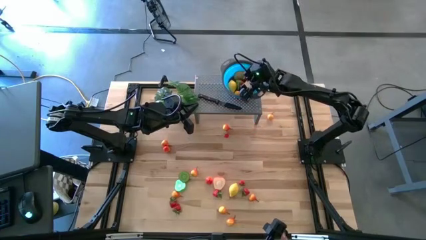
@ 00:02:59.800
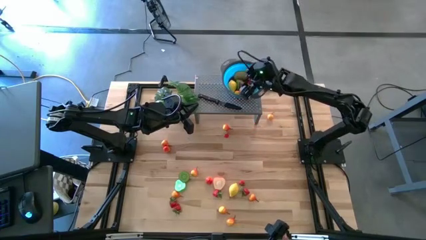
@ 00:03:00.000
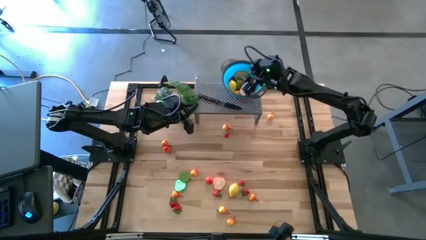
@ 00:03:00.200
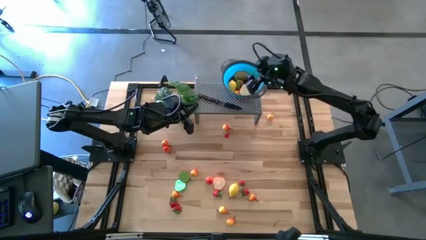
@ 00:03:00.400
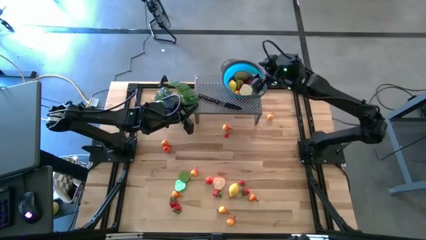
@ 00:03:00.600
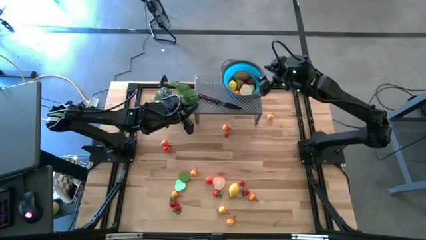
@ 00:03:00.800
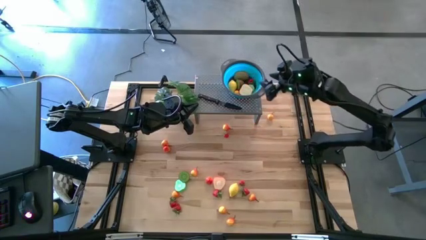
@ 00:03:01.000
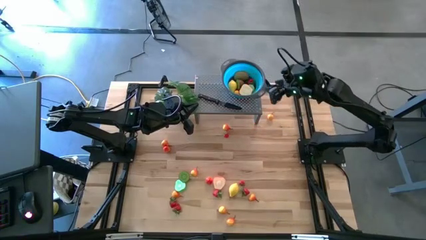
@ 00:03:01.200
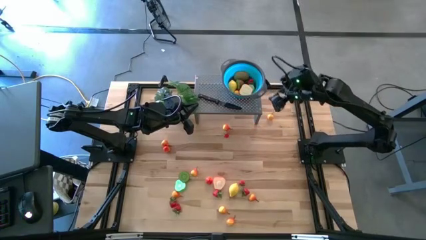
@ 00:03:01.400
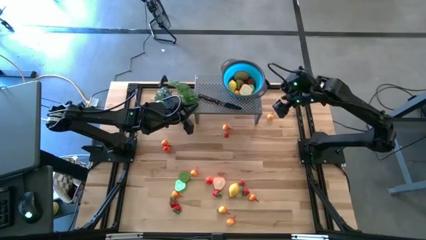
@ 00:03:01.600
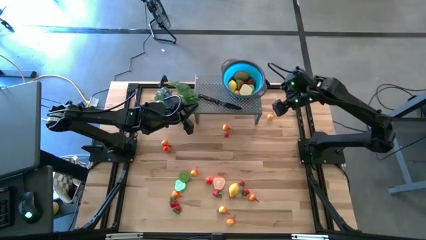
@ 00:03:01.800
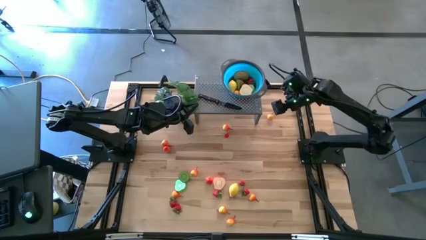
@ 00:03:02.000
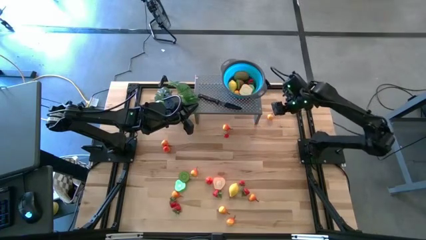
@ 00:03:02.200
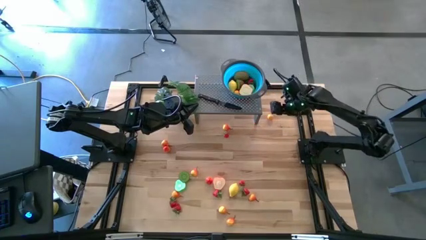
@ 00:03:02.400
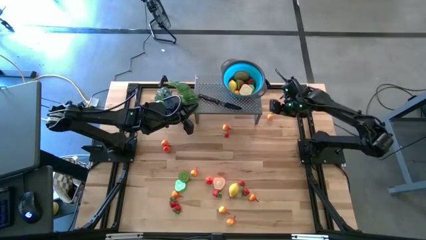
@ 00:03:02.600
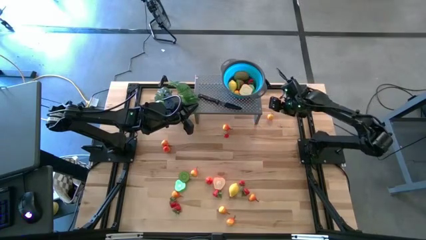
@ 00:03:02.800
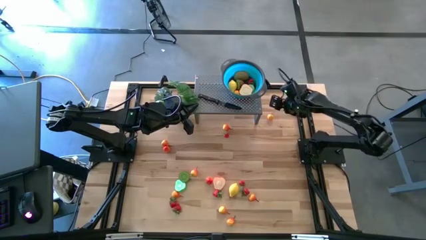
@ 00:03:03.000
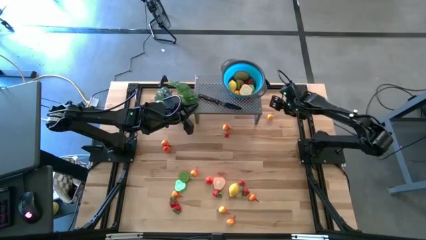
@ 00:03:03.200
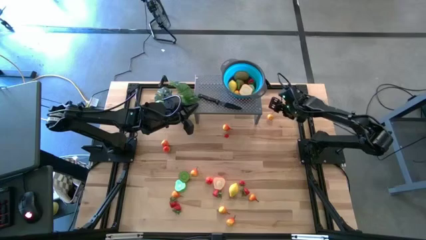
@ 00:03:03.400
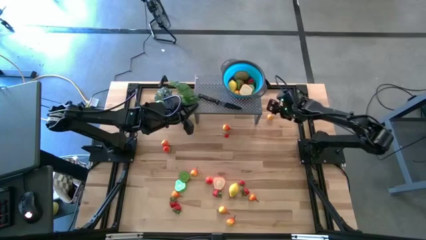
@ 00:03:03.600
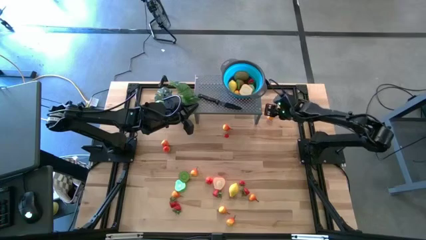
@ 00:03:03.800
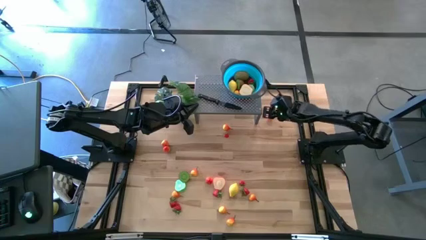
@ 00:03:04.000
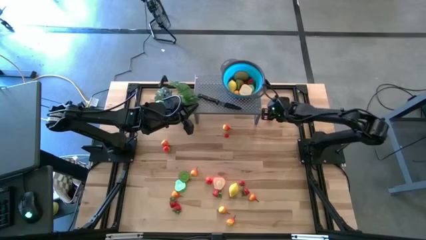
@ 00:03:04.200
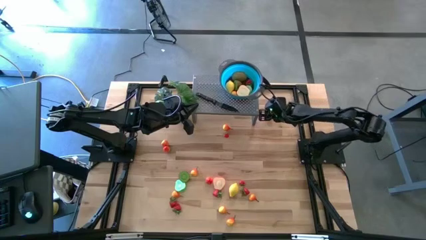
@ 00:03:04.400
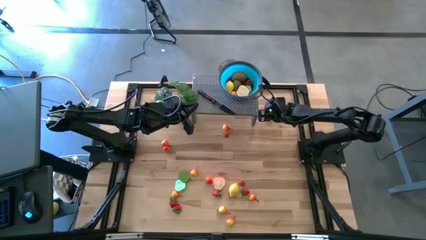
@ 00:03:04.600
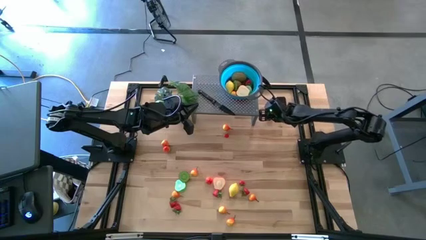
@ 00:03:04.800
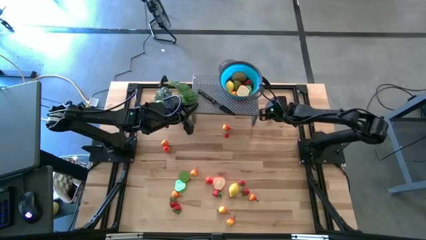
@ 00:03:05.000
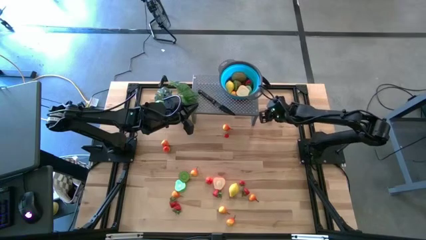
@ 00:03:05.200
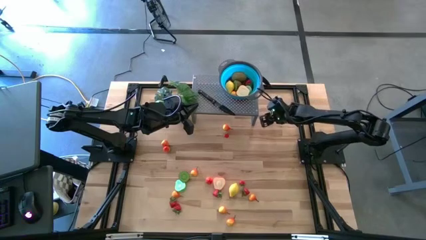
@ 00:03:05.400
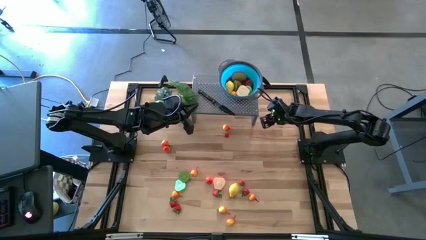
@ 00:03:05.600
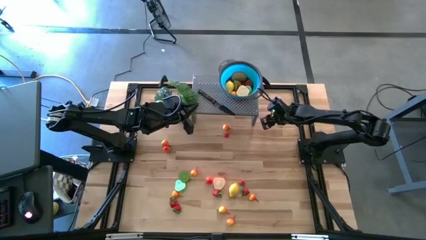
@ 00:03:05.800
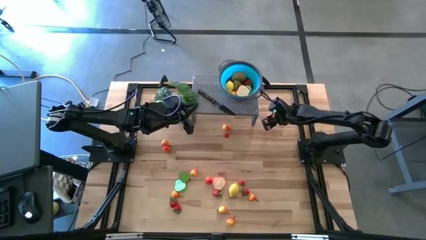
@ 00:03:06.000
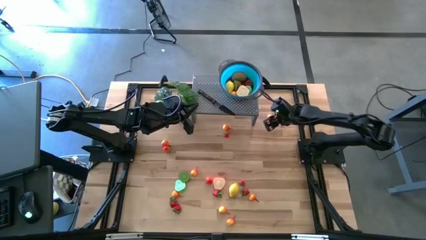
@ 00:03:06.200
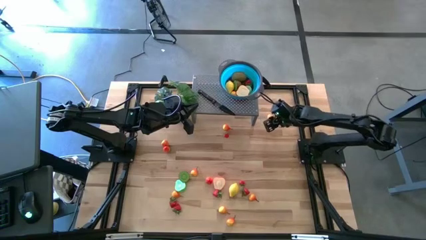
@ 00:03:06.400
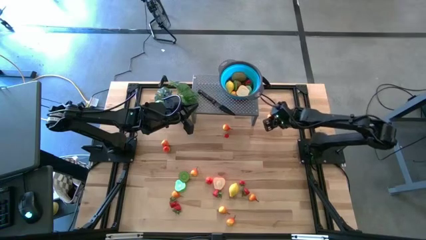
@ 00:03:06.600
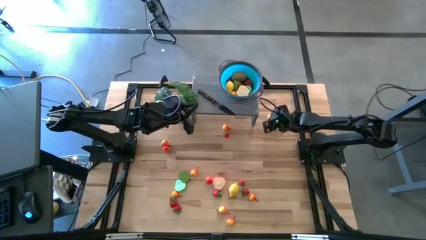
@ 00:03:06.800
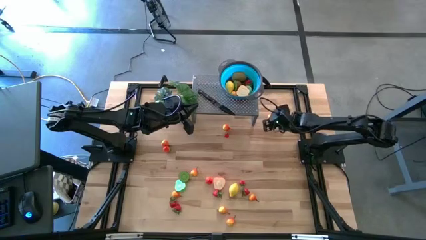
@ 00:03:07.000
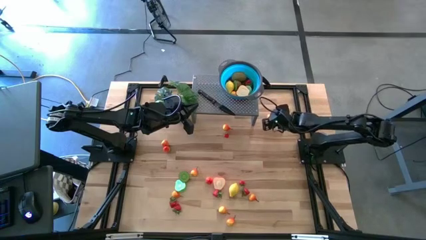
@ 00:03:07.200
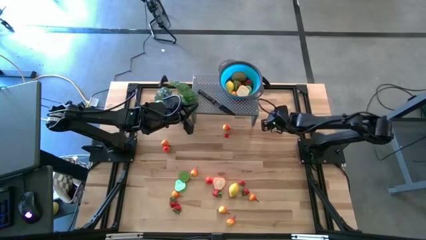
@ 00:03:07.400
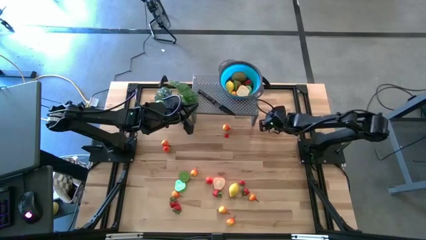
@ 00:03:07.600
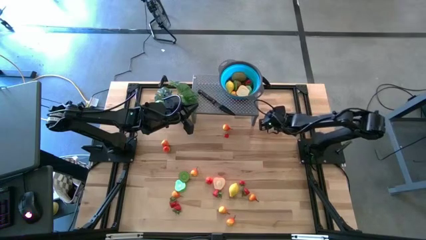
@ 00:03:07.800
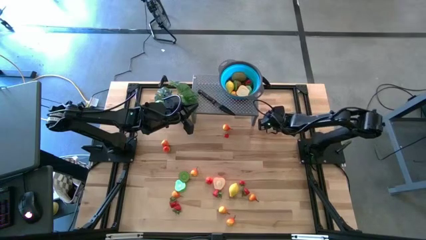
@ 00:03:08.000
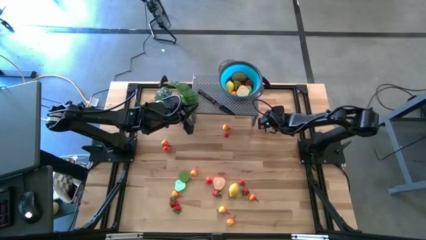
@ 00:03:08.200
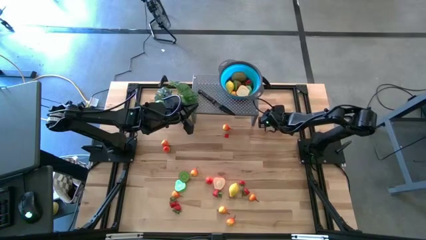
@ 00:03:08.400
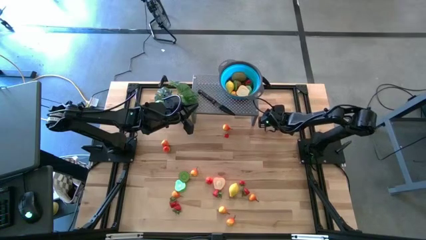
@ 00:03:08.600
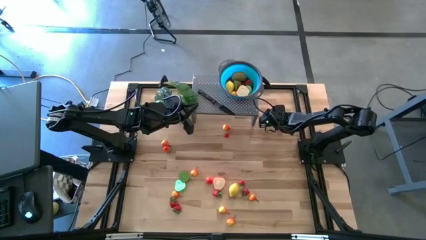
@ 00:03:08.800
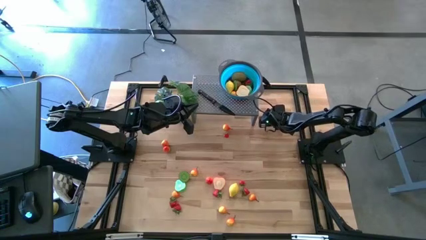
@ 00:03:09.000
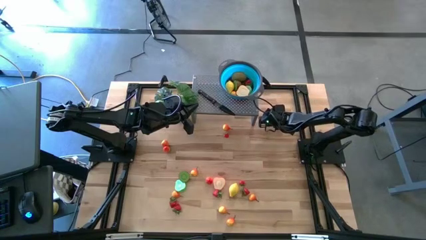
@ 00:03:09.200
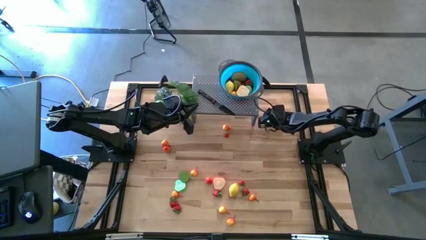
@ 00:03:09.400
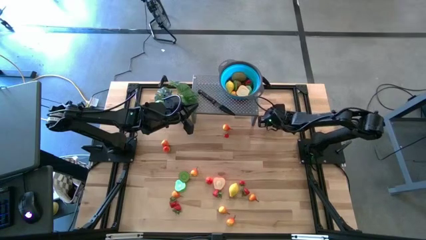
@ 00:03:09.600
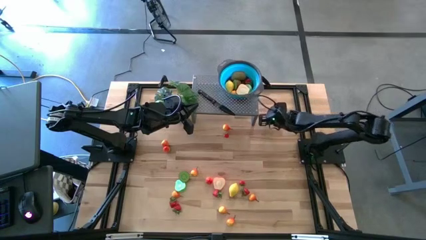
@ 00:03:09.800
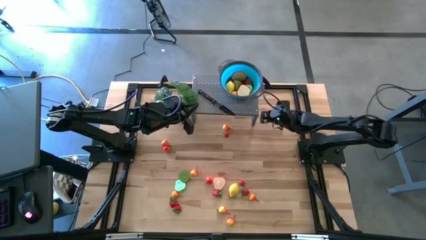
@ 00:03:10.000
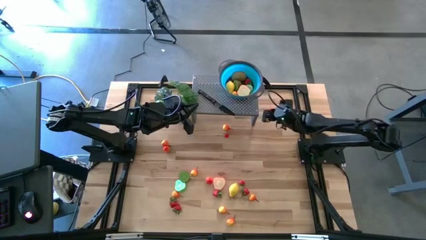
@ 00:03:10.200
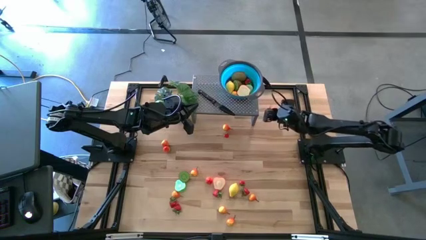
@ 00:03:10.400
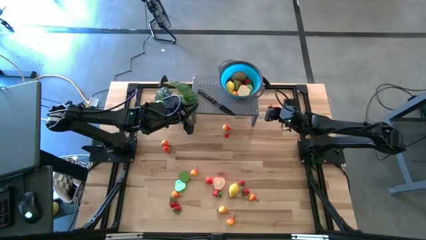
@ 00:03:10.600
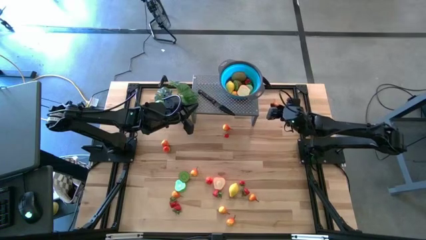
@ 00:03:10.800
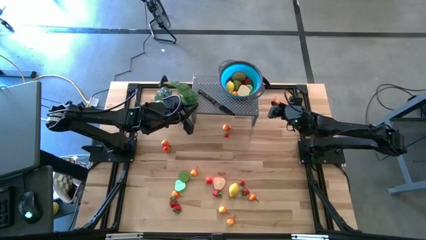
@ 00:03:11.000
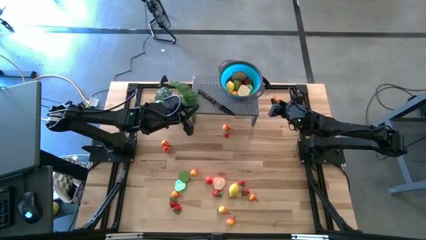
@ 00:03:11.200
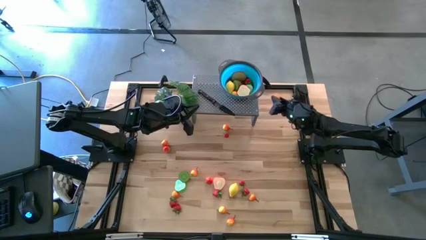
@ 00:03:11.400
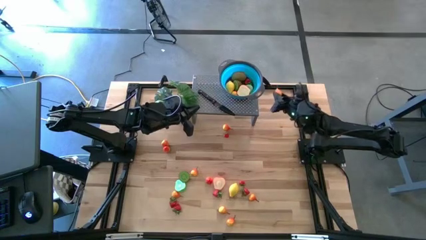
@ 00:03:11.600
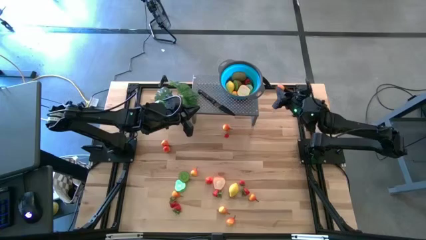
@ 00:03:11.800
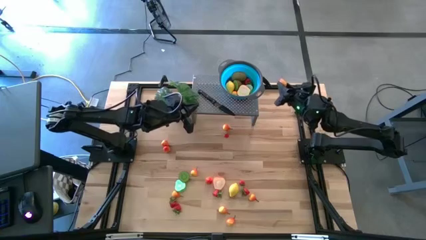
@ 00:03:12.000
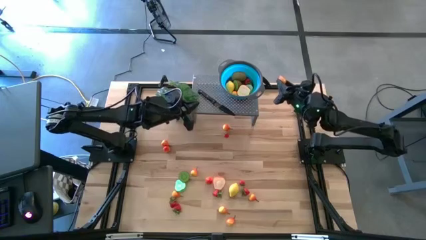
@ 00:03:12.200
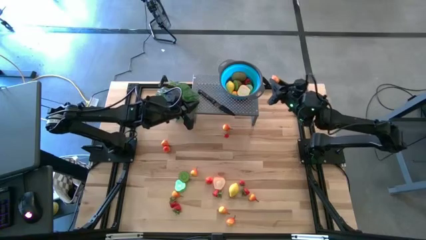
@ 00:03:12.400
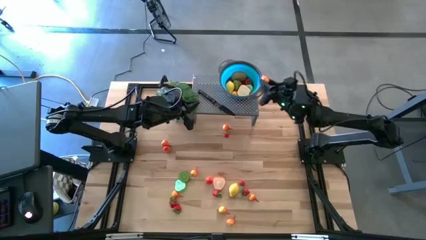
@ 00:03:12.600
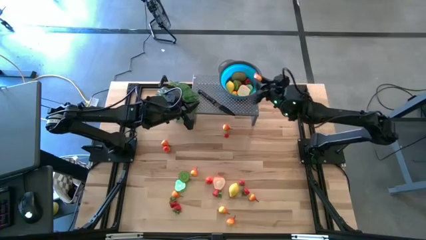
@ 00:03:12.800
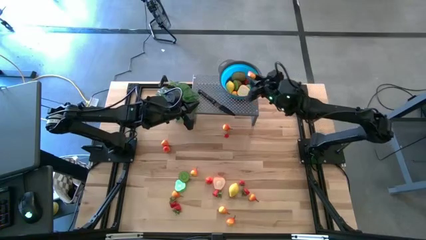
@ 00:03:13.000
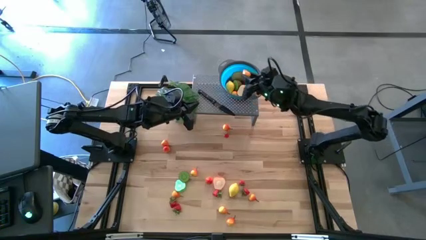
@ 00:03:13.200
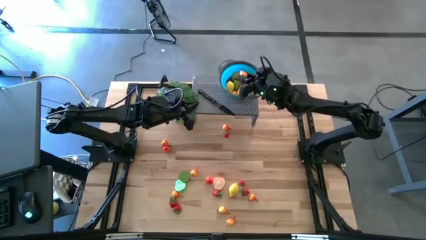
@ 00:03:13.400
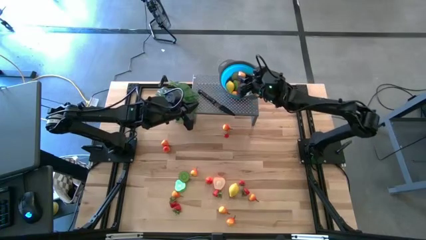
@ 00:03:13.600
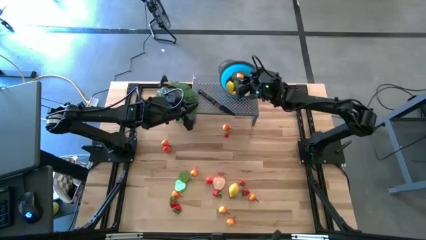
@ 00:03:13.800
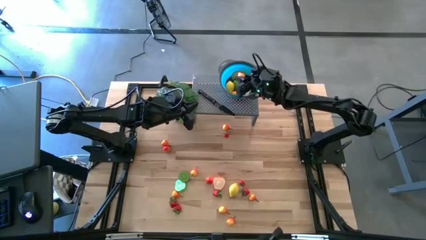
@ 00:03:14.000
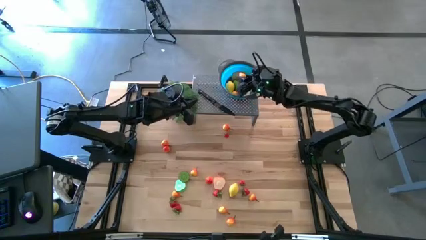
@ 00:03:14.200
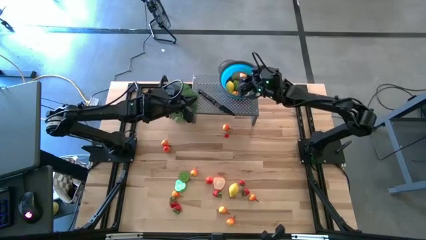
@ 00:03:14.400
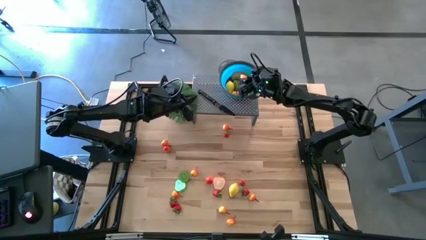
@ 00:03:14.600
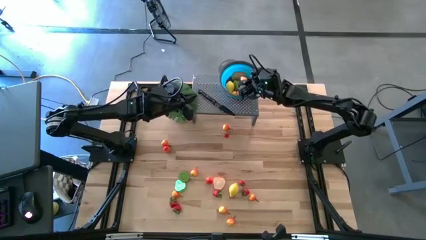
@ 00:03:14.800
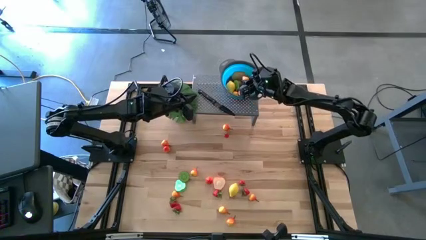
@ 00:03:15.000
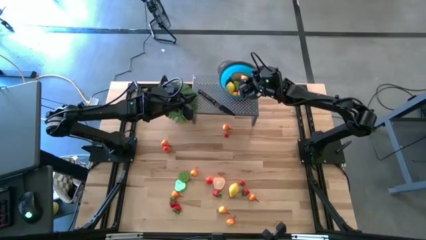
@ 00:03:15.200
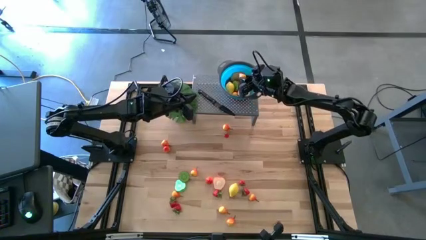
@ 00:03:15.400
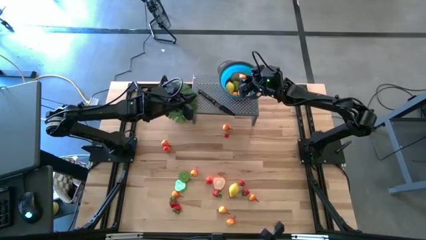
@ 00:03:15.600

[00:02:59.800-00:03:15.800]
Task: Pick & Place Fruit
Put the yellow pear in the blue bowl on the shelf
